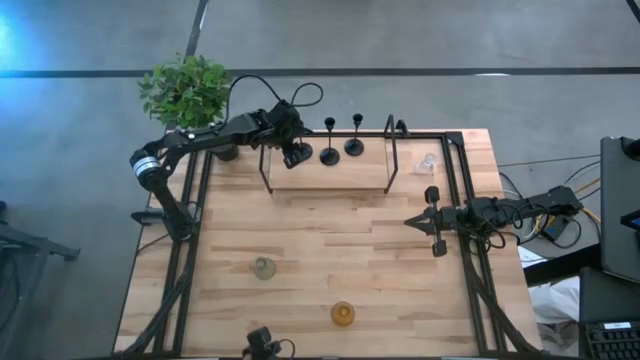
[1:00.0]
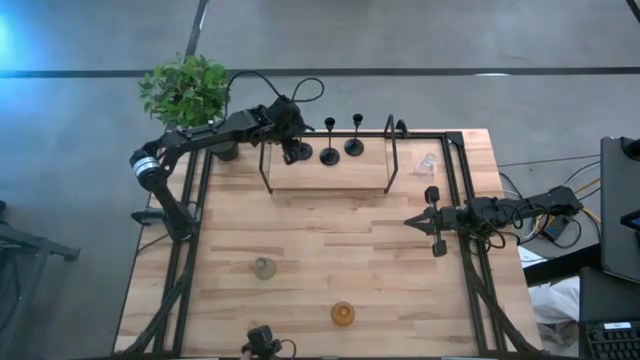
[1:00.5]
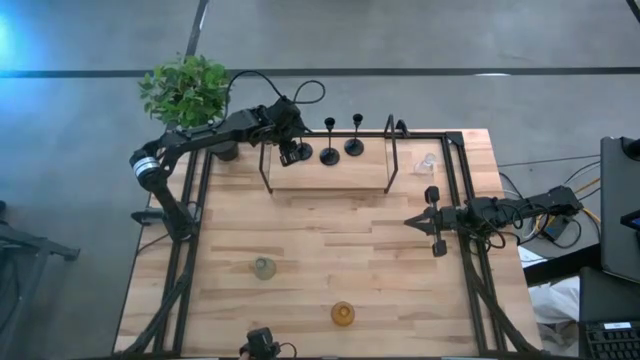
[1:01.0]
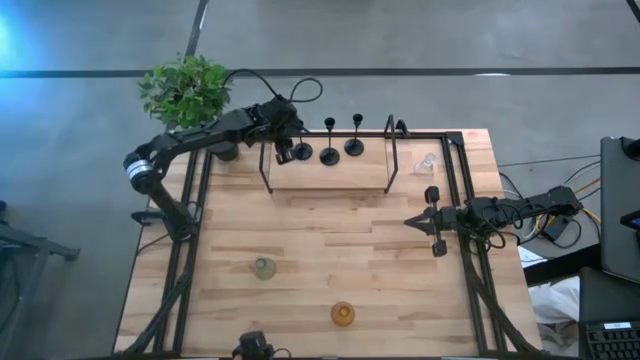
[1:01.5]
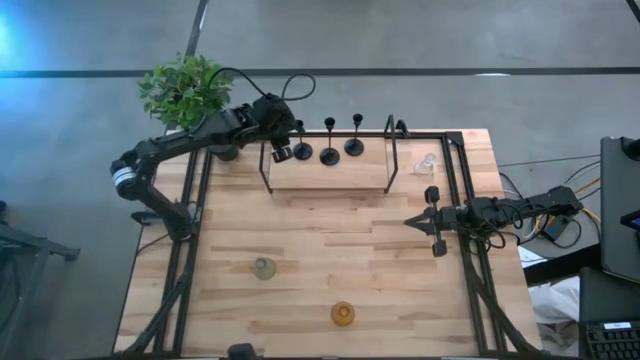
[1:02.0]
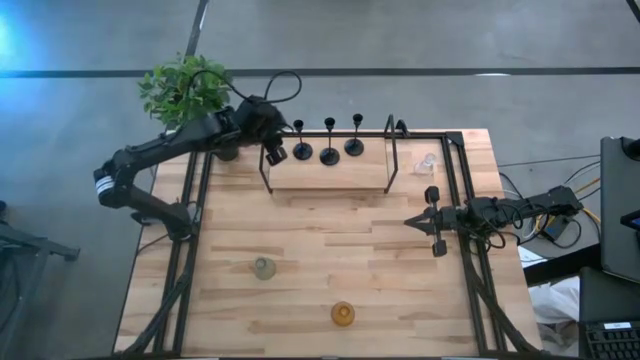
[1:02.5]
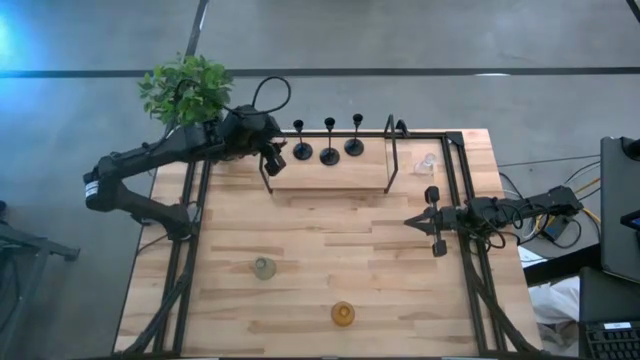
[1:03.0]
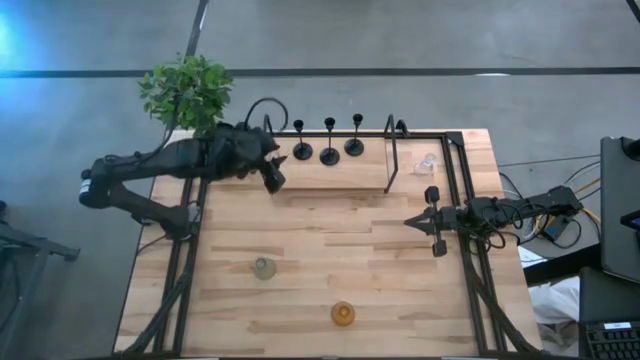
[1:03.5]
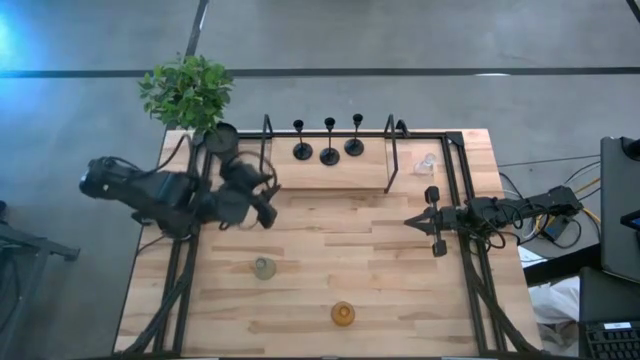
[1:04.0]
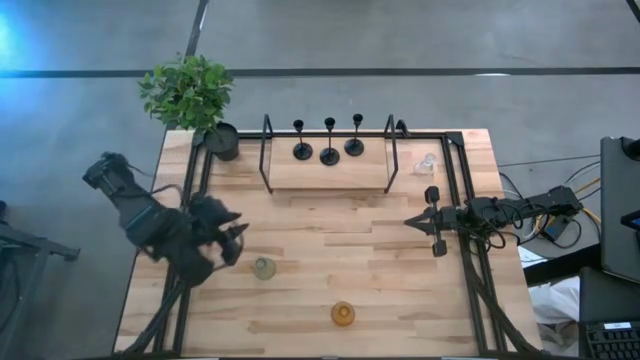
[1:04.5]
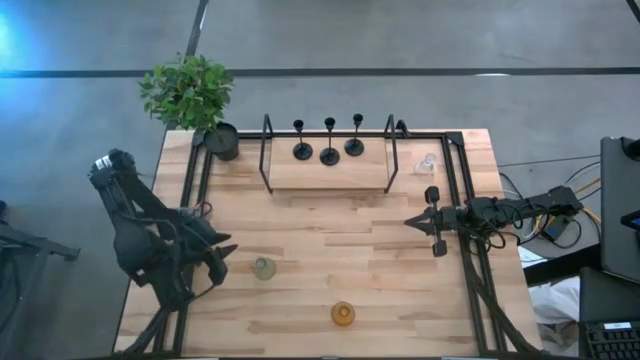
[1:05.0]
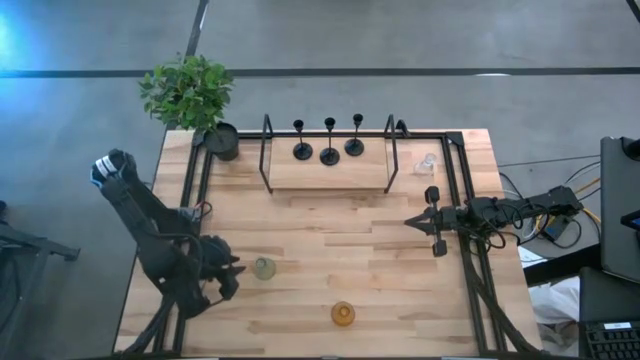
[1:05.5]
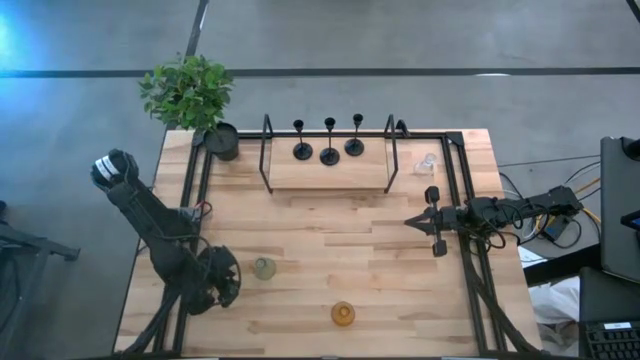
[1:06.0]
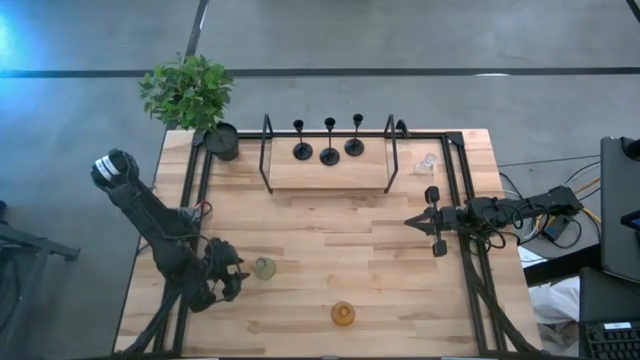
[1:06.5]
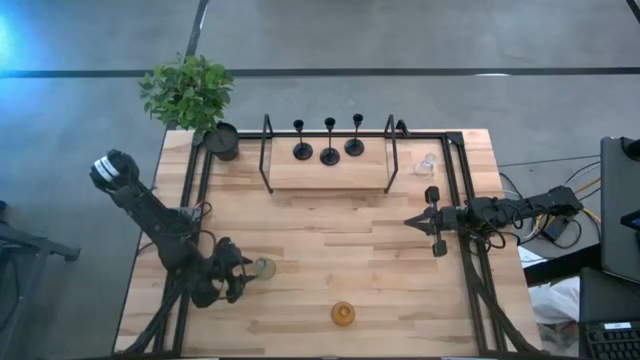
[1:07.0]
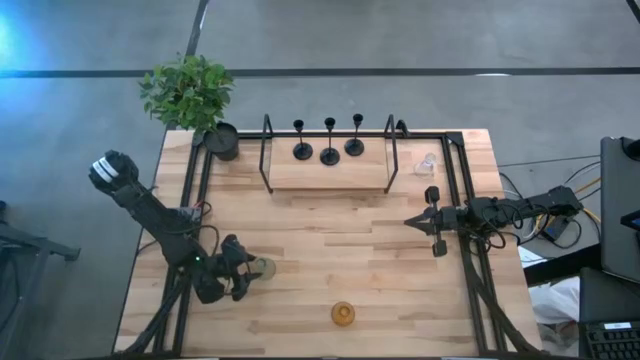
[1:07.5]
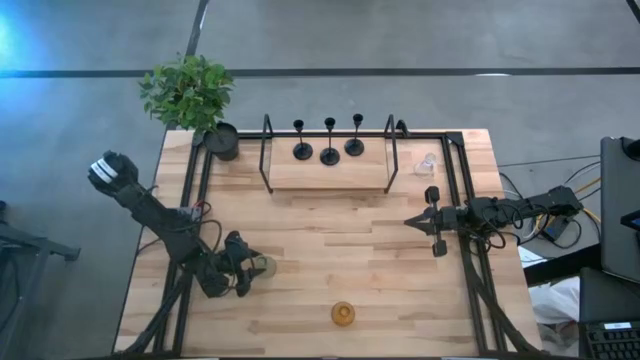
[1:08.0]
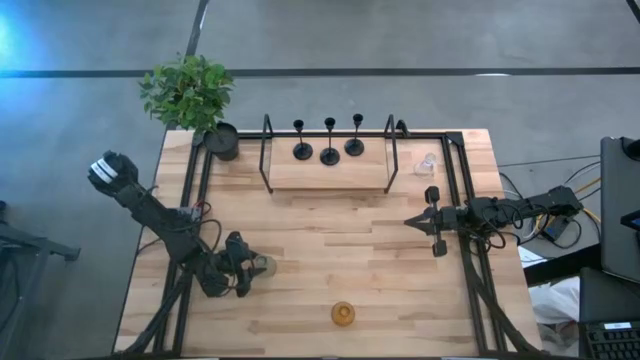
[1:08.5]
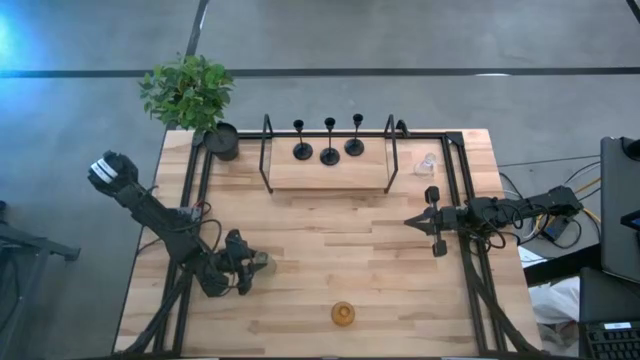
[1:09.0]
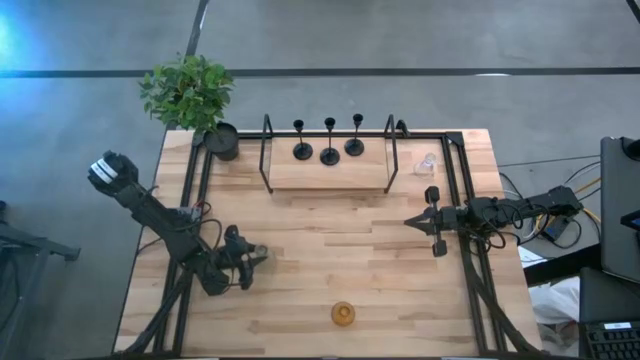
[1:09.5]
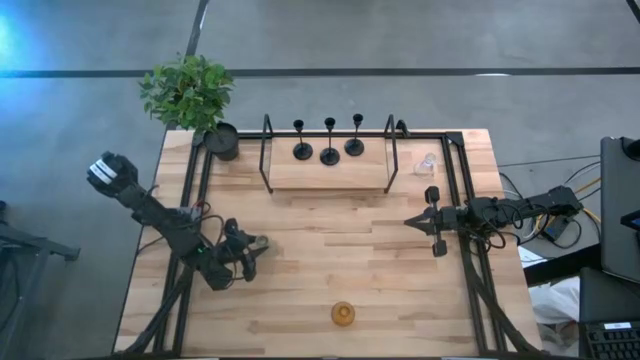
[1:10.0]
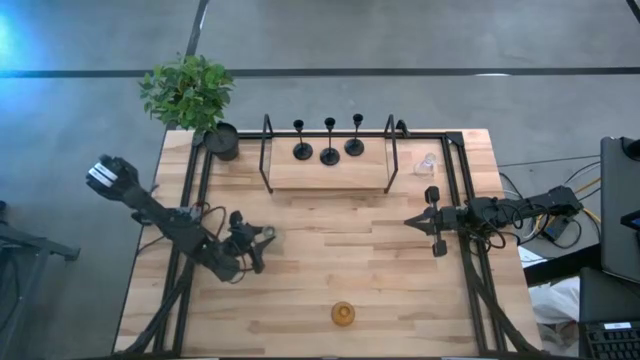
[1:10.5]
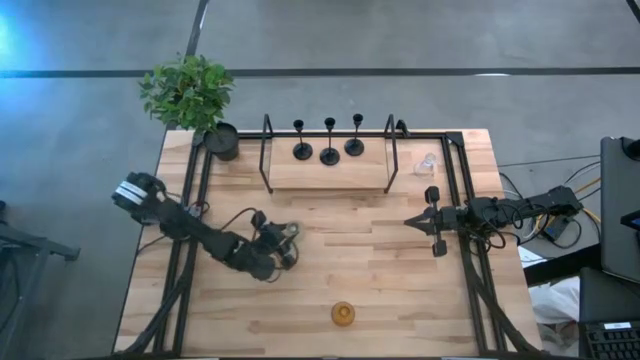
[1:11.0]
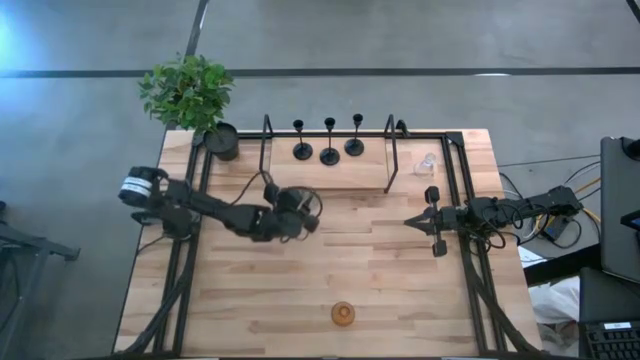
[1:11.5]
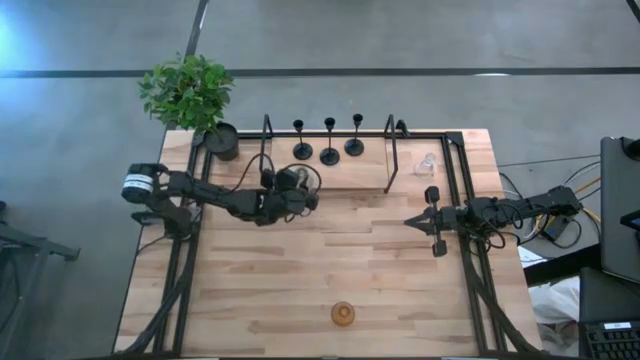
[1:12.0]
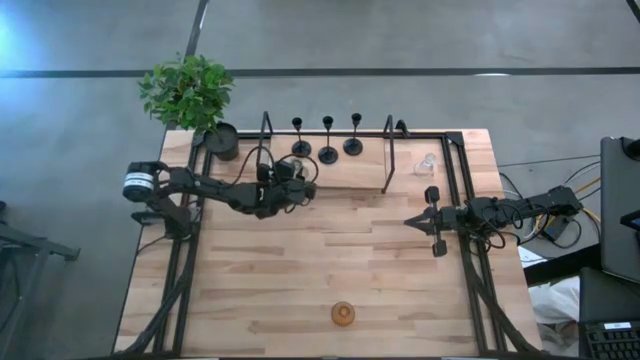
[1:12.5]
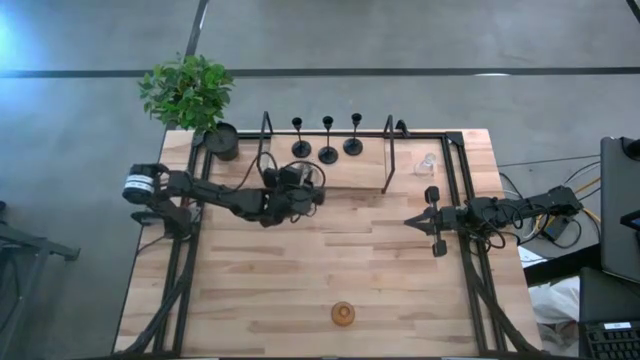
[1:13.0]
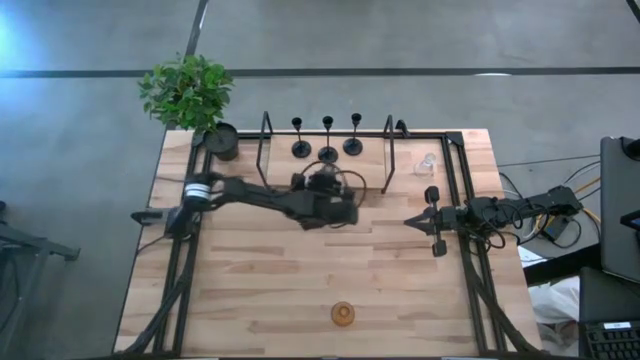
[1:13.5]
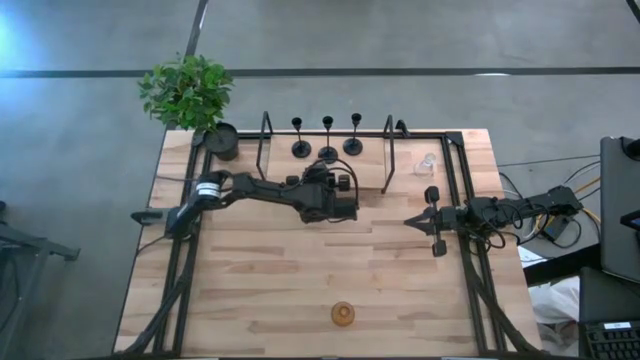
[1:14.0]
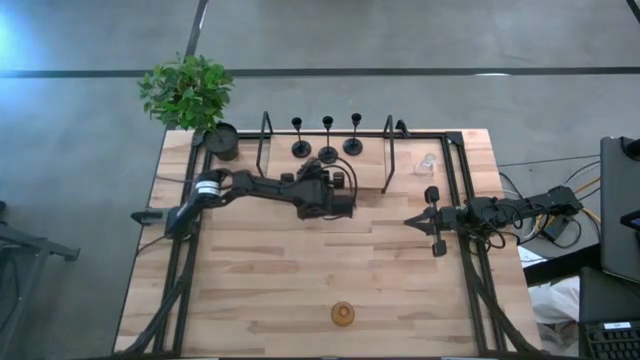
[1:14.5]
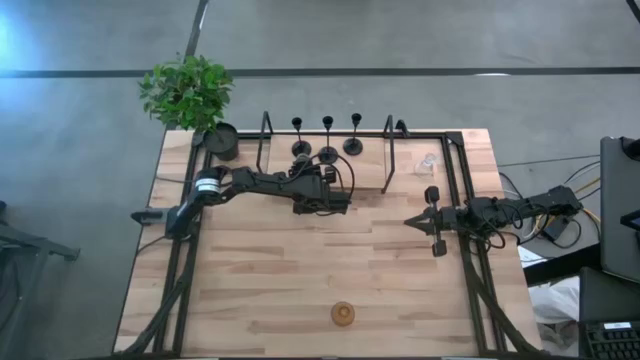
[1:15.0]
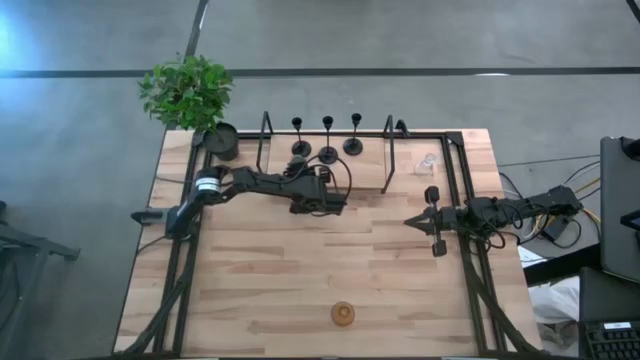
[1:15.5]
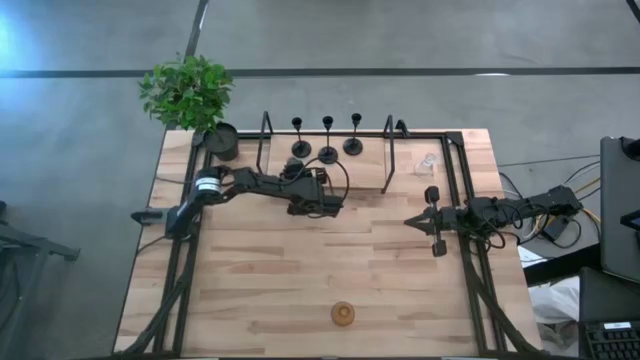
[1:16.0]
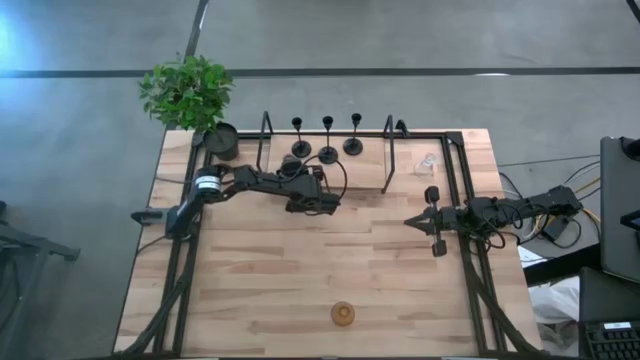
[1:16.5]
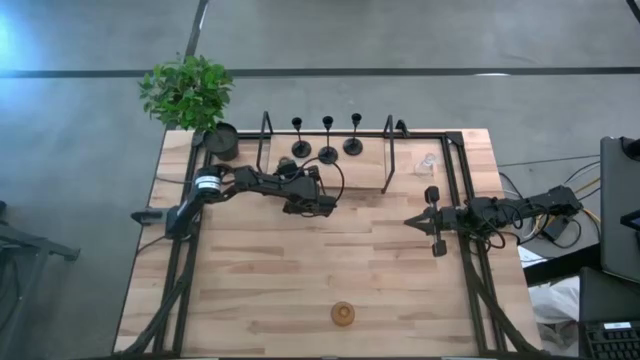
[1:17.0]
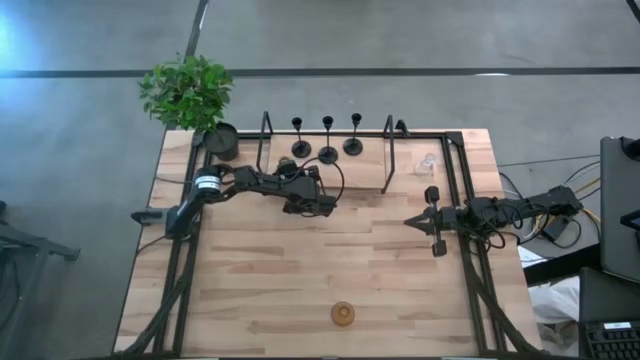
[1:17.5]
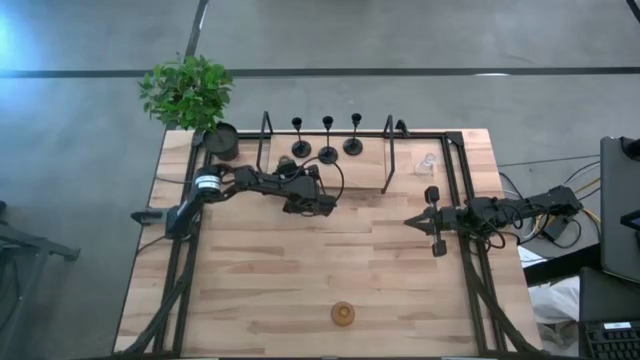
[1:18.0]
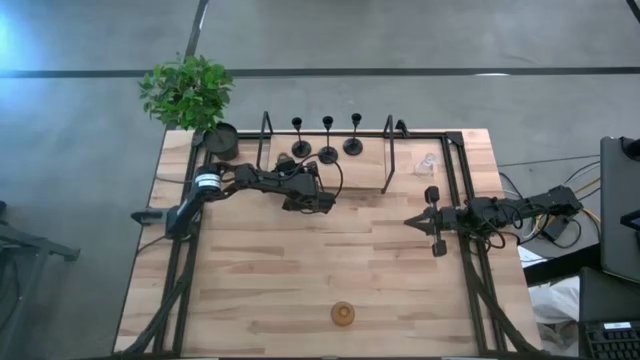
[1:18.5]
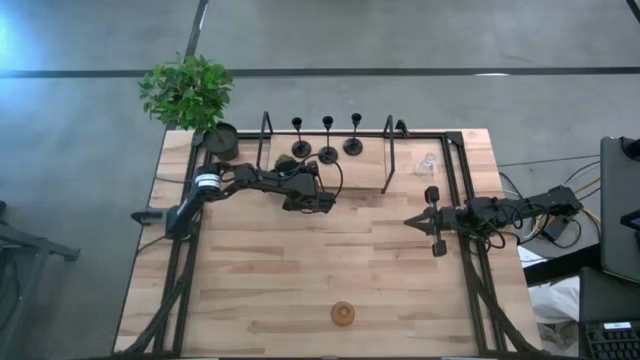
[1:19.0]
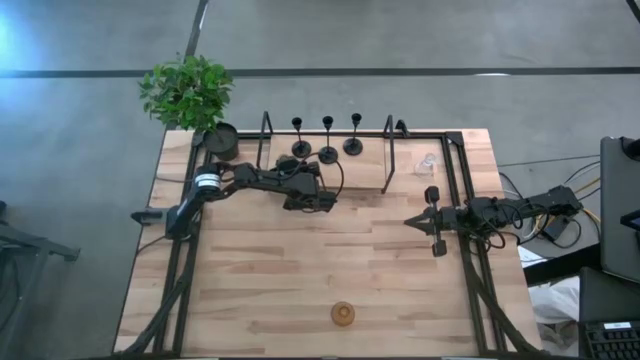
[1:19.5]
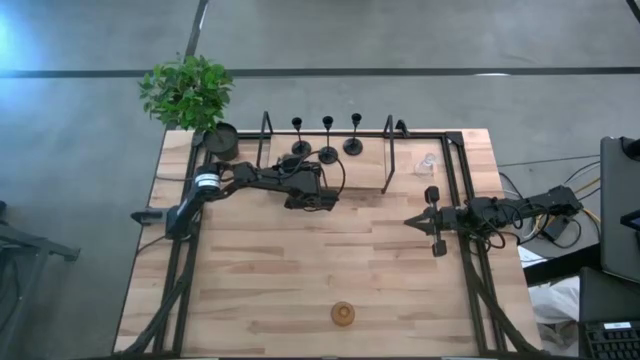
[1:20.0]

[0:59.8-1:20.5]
Task: Pick & Place candle stick holders
Put the green glass candle holder on the shelf

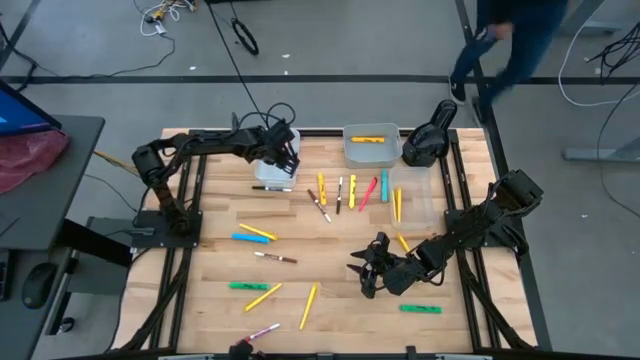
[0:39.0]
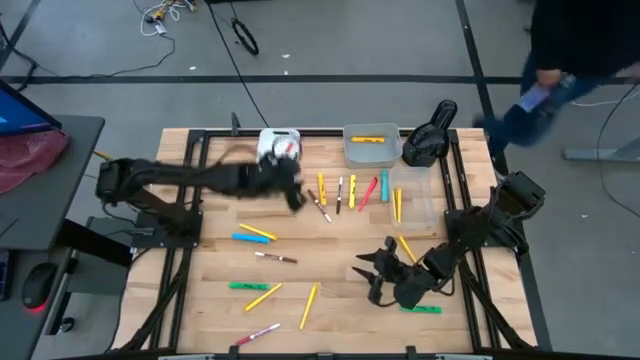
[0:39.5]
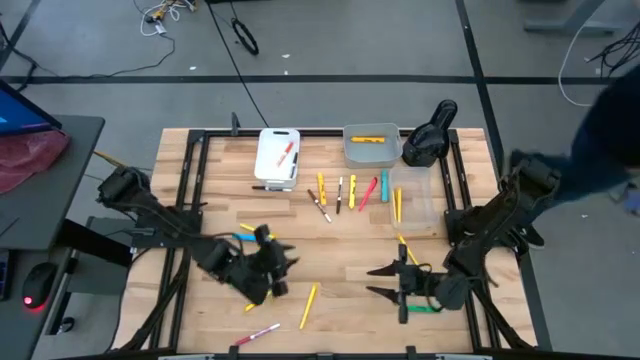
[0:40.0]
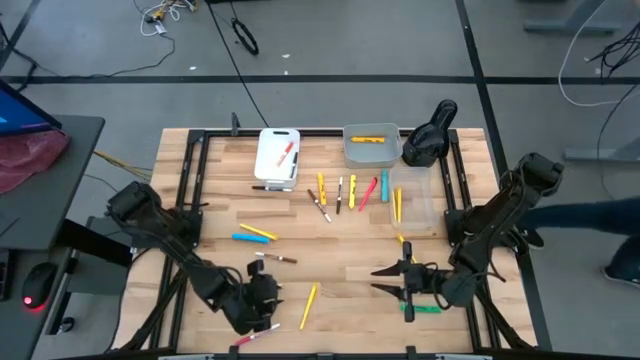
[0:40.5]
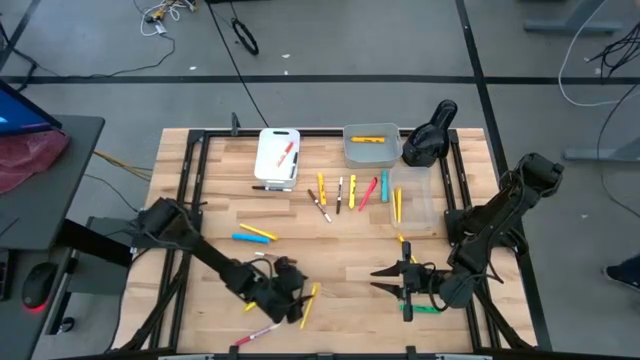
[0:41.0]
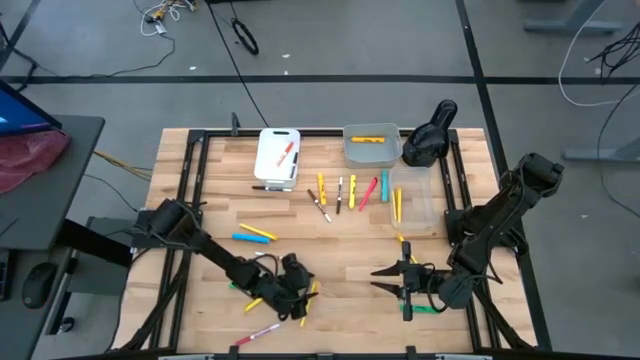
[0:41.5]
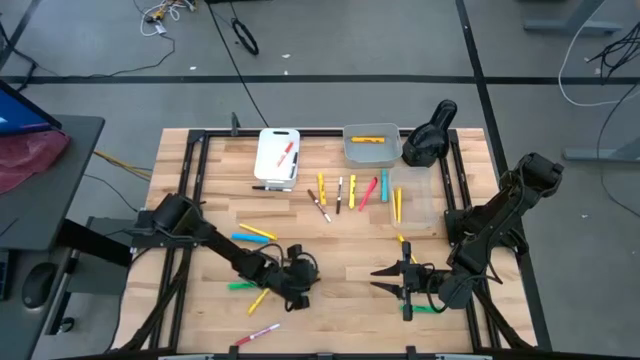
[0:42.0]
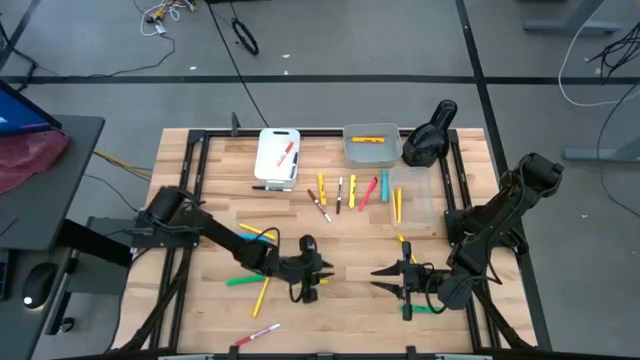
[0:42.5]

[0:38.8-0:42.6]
Task: Pick & Place Markers
Put the yellow pen into the transparent bin
